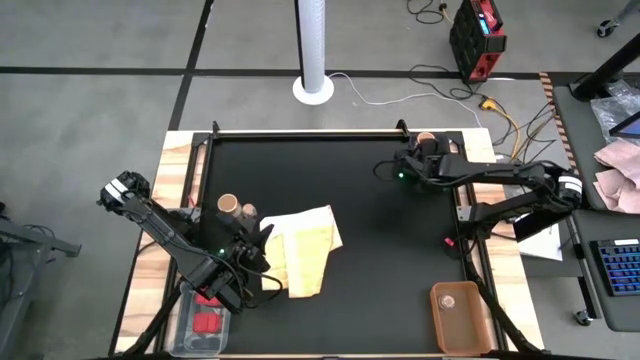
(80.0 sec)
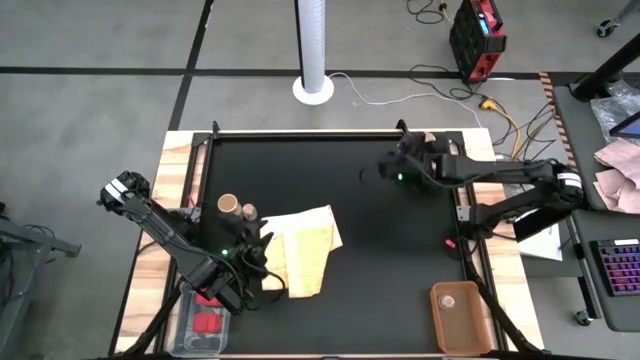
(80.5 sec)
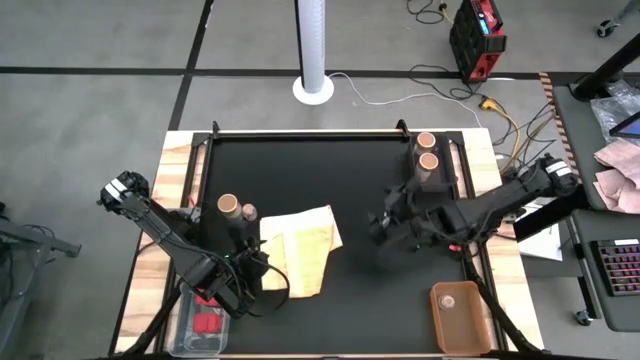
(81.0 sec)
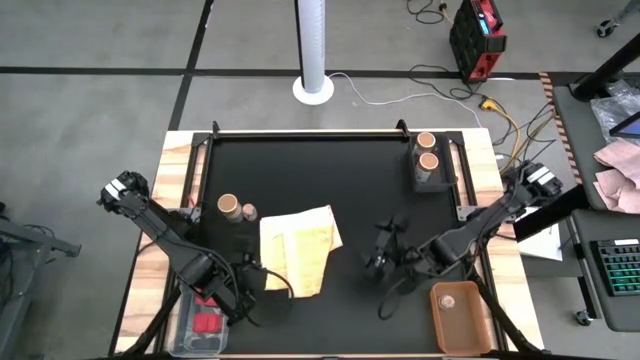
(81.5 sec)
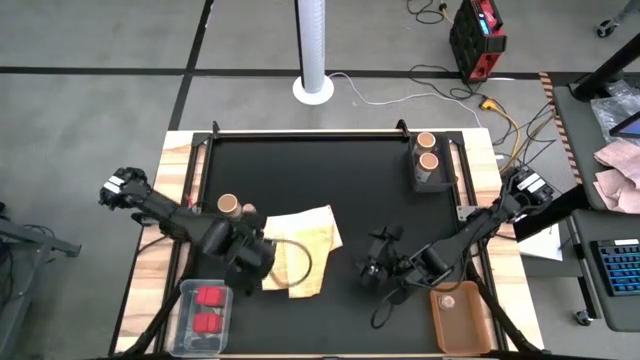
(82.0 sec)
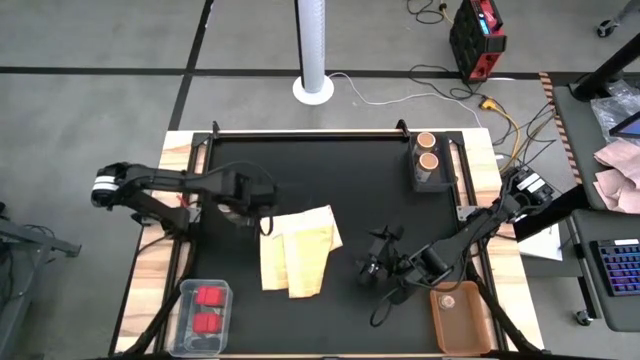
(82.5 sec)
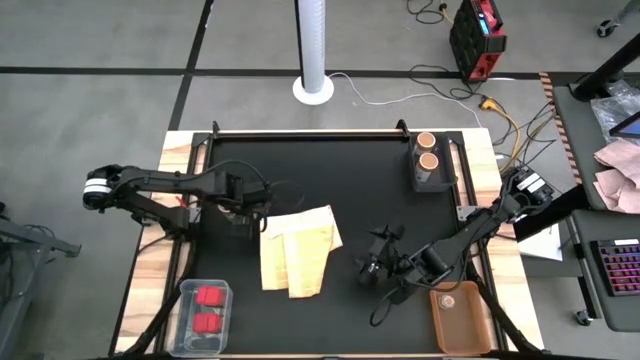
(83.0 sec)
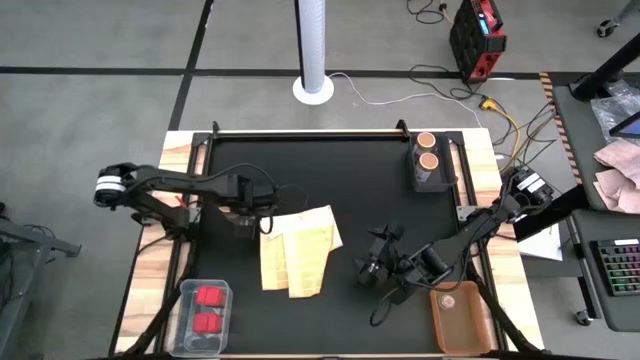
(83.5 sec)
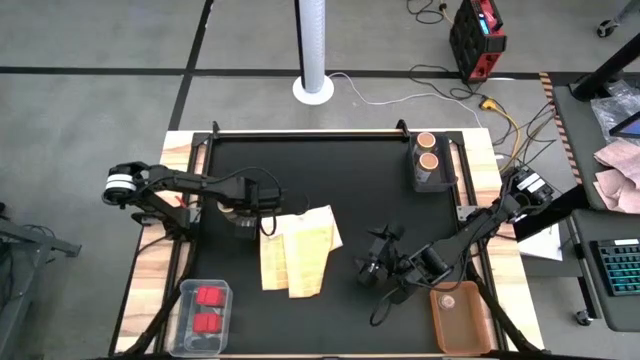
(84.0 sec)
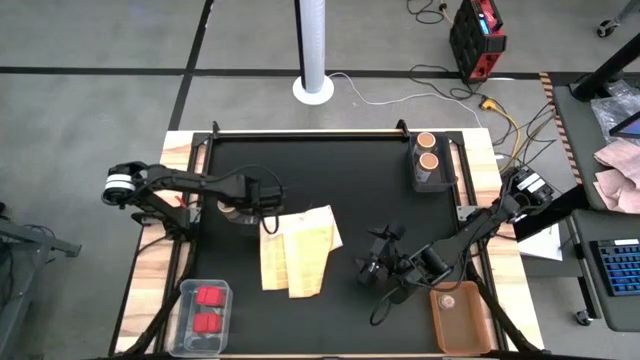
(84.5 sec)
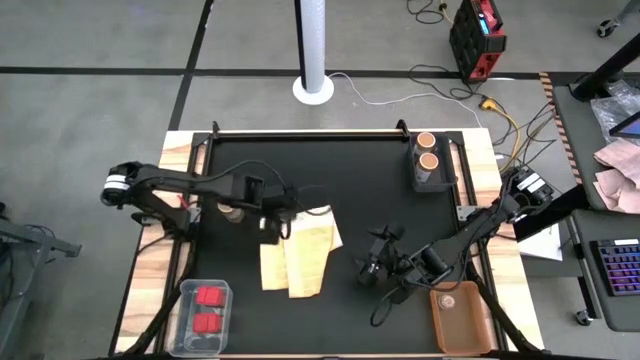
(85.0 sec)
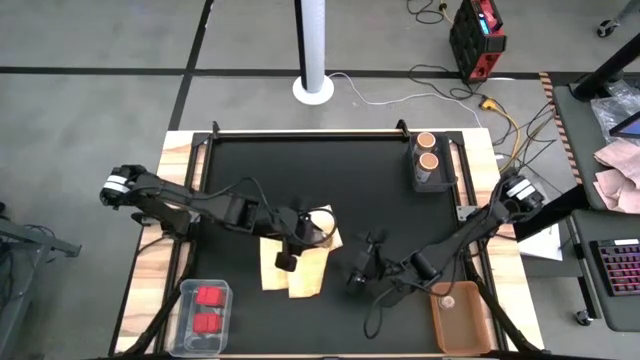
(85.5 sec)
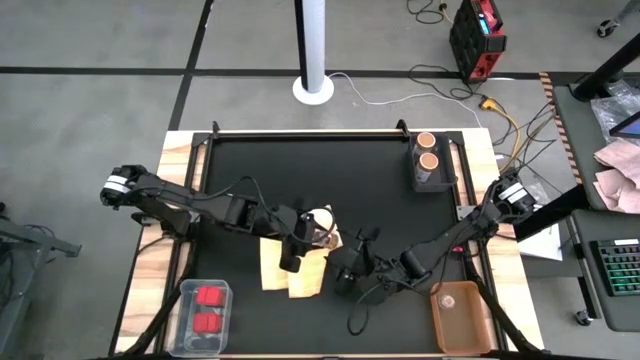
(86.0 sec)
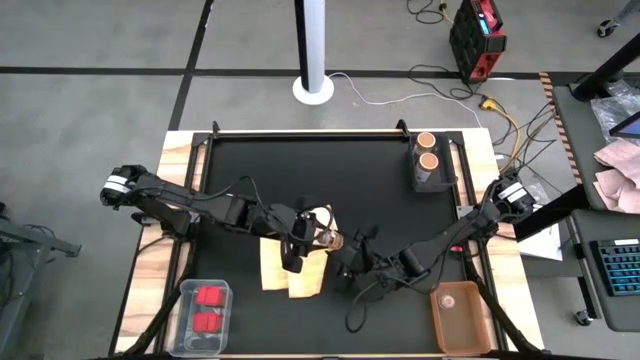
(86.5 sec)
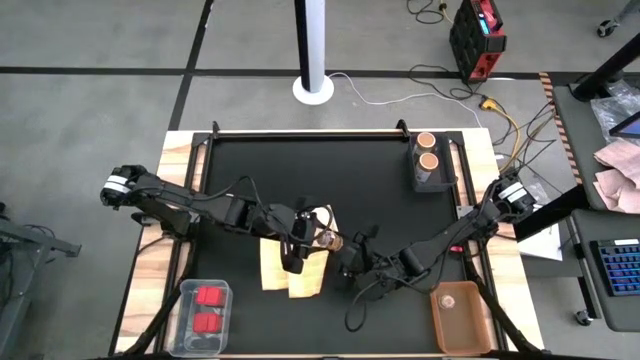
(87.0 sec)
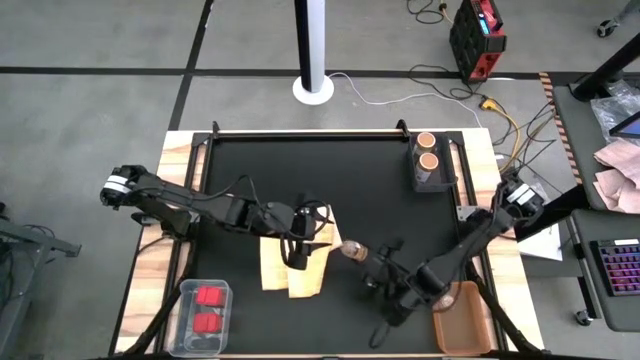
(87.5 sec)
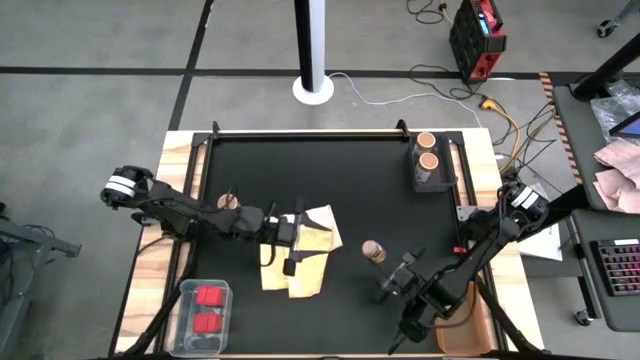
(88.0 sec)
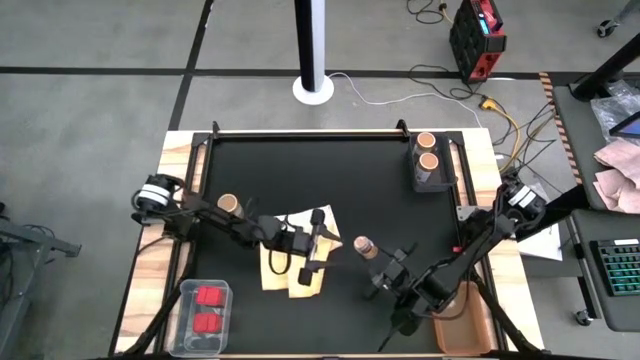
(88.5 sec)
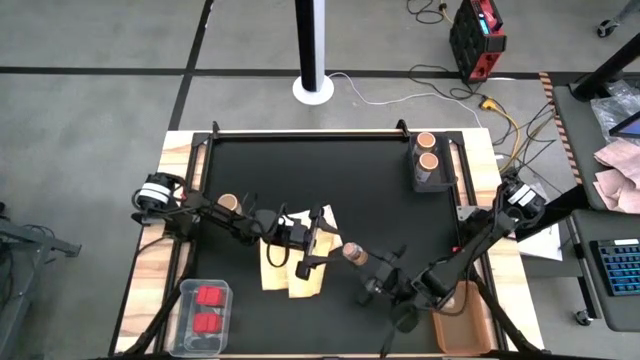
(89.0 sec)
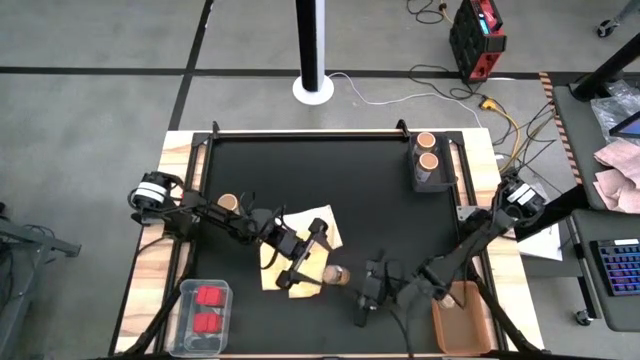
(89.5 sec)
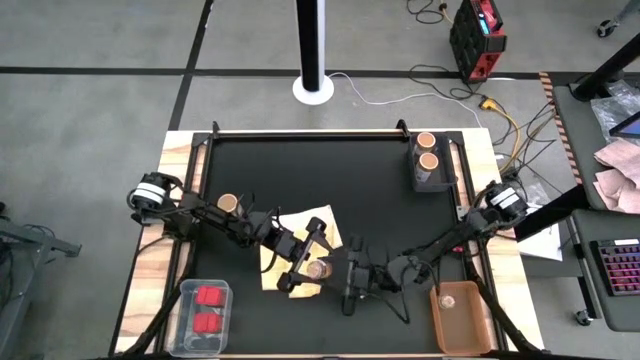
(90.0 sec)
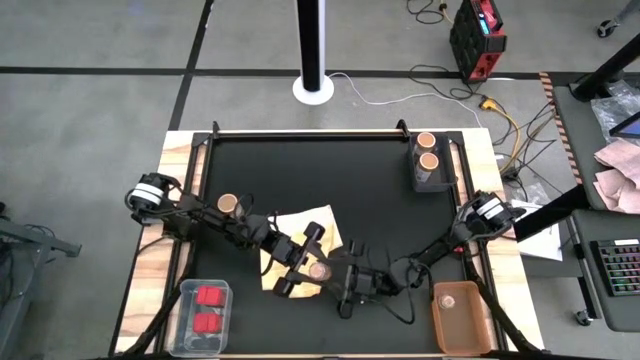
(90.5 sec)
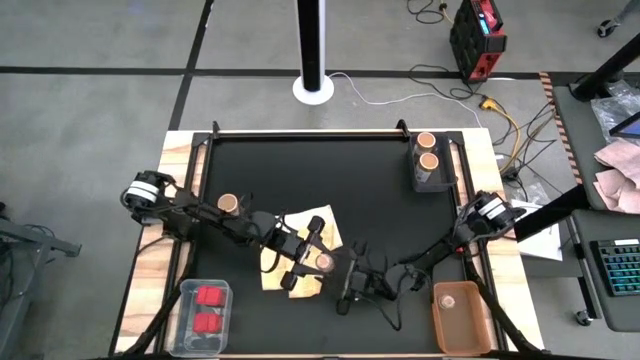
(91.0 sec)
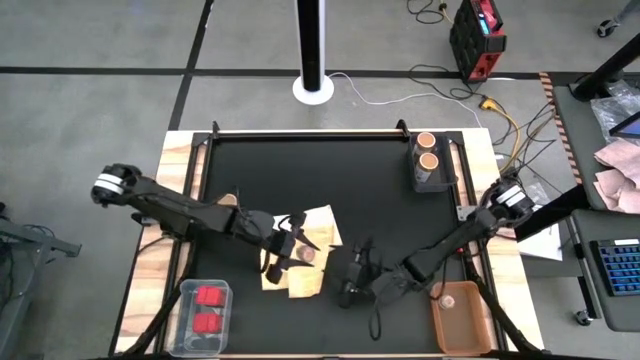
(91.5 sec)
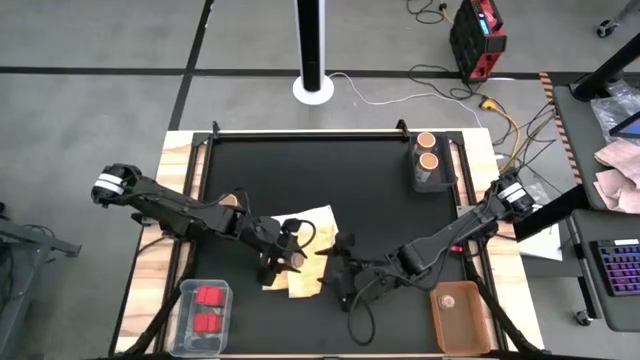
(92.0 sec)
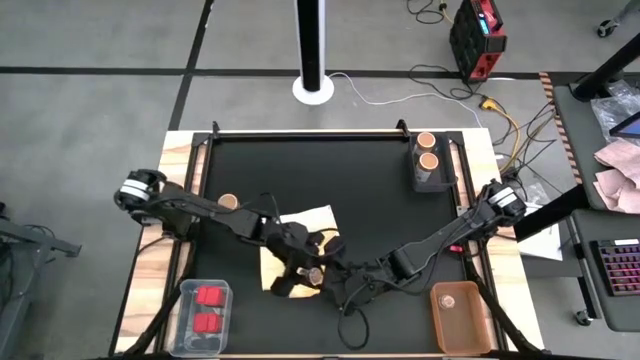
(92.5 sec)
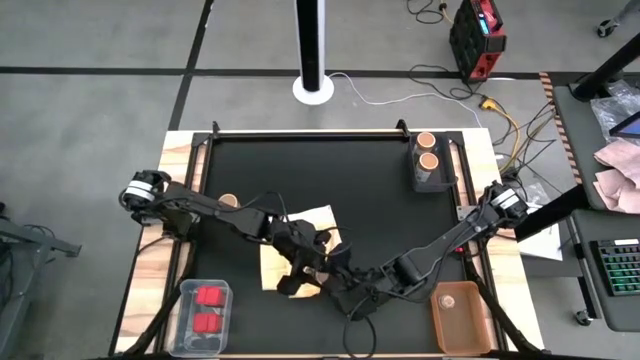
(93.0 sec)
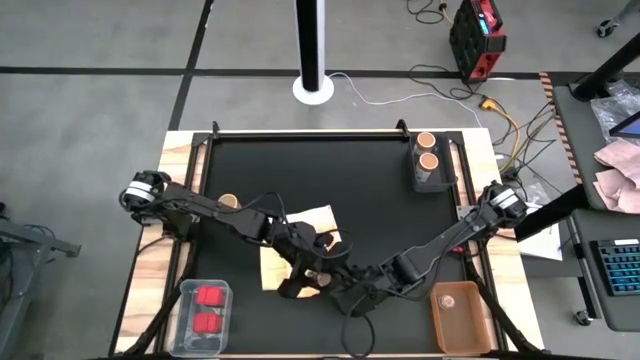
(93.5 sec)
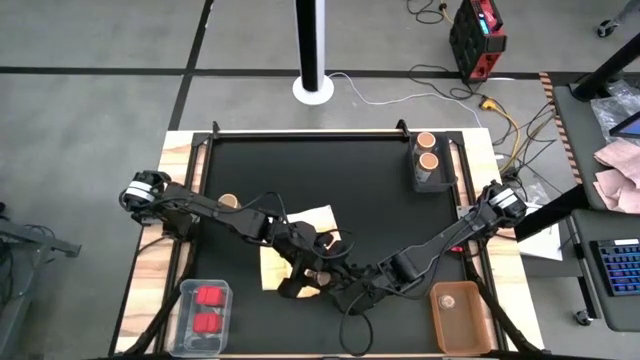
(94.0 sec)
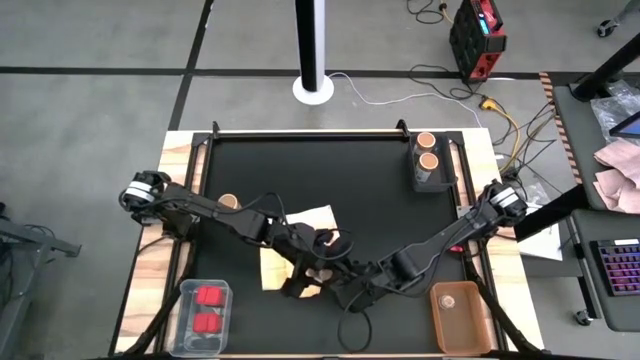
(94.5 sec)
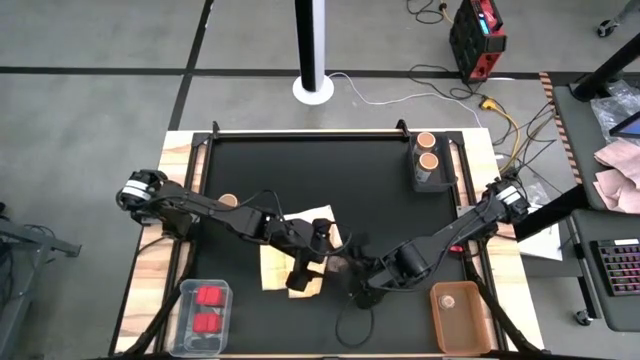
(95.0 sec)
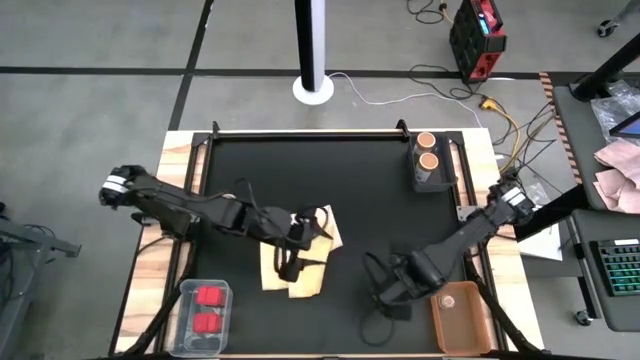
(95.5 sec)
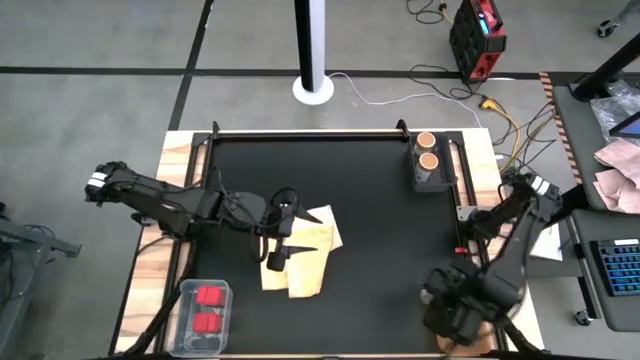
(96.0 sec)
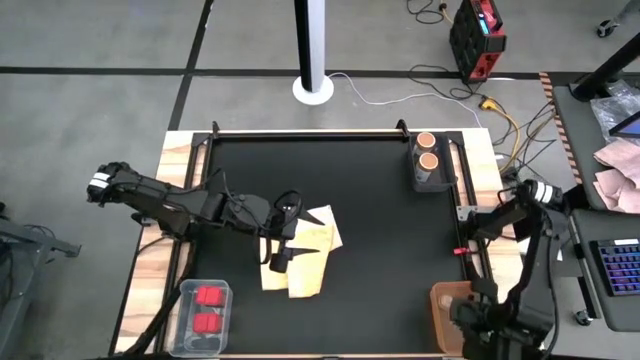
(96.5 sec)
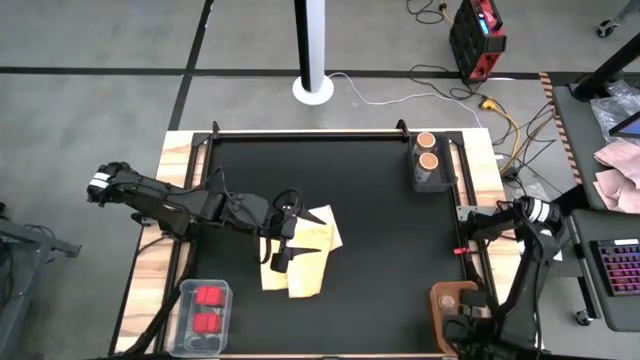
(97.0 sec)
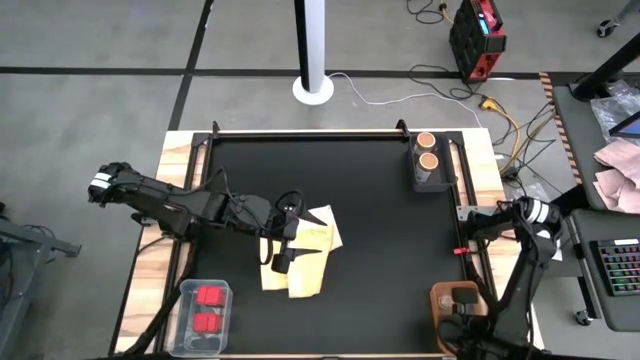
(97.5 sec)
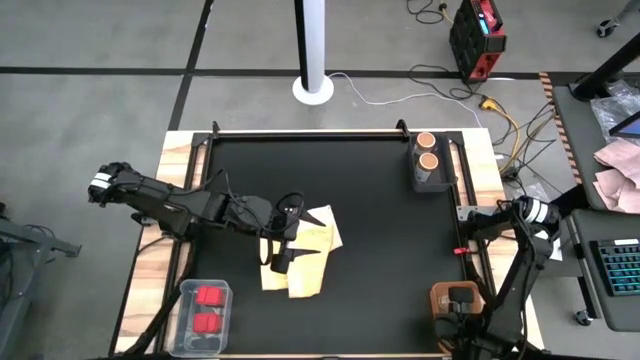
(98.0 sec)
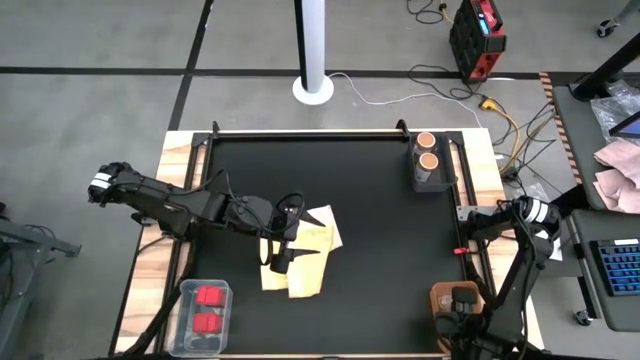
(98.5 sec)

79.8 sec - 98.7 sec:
Task: Sort spices by type
Put the brown spice bottle into the orange bin

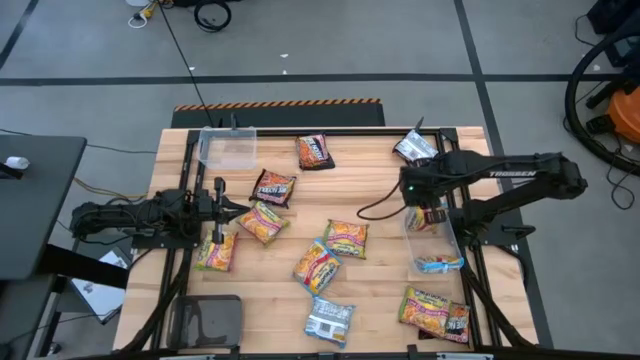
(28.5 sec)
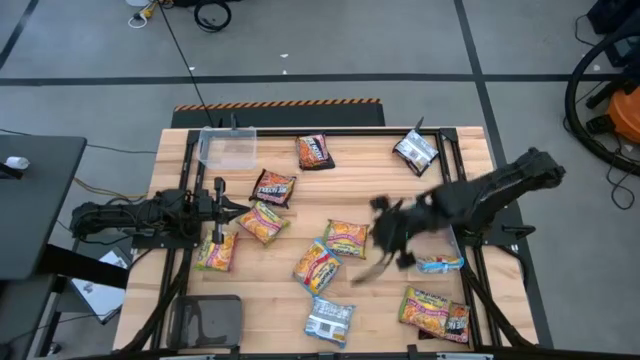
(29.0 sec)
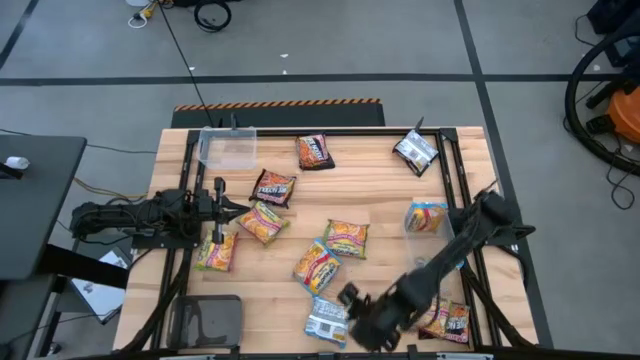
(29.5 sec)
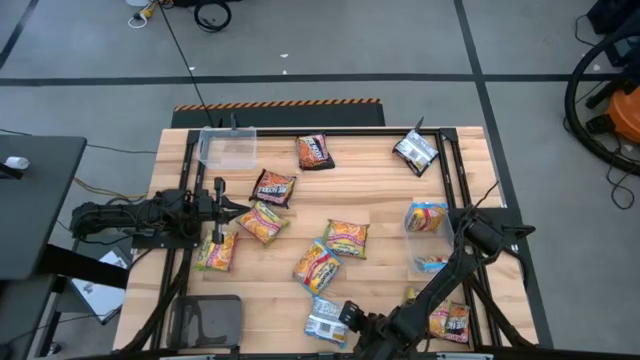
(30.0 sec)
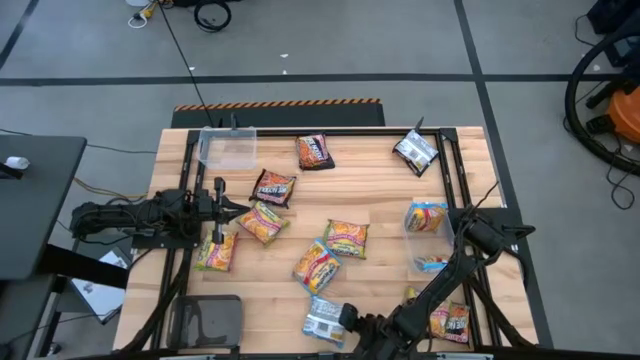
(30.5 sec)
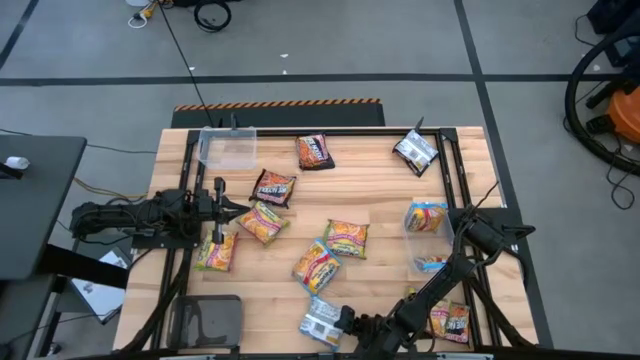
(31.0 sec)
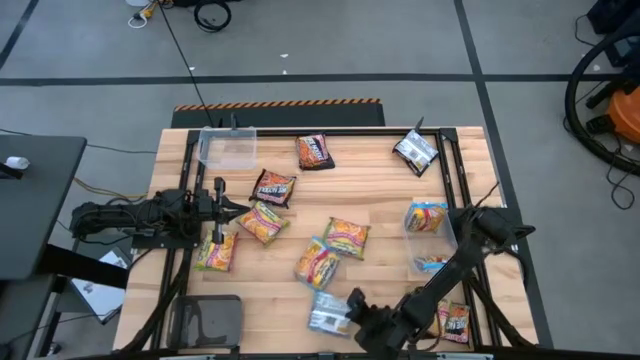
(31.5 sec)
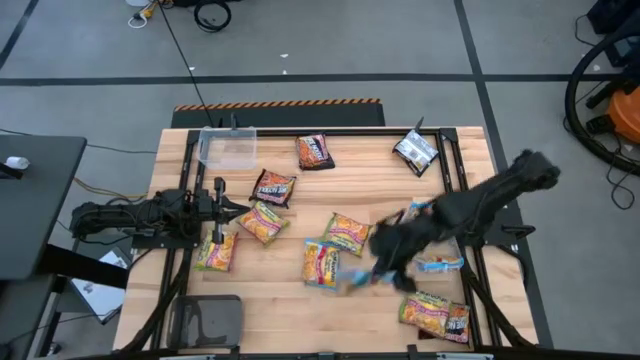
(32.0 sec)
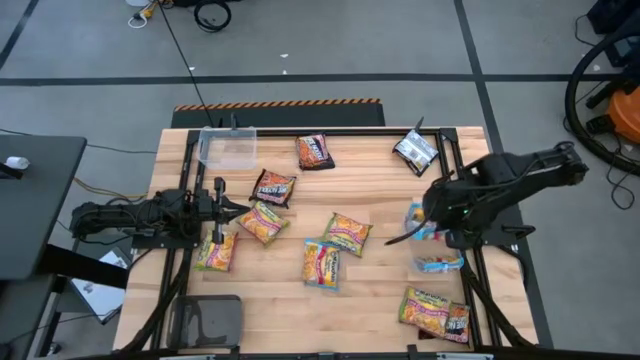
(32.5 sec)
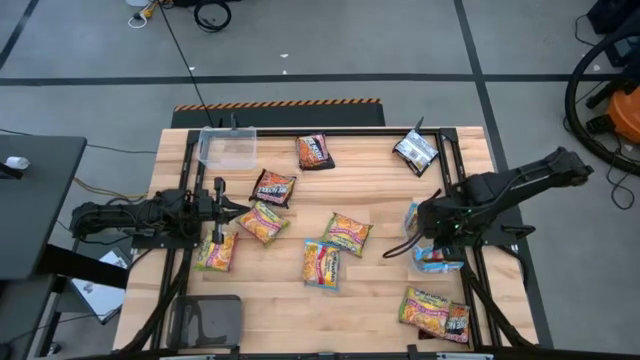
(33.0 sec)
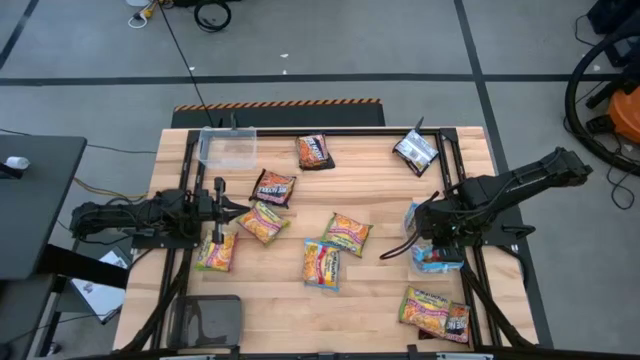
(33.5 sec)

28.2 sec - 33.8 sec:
Task: Sort Maruchan noodles
Put the blue noodle pack into the bottom transparent bin
